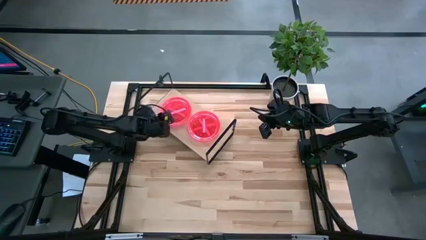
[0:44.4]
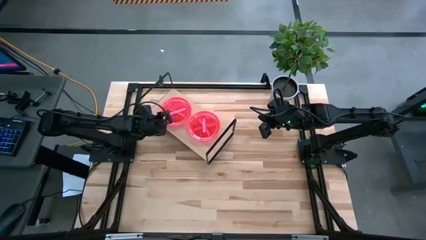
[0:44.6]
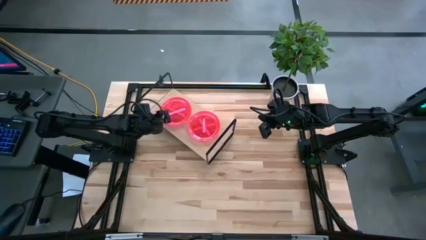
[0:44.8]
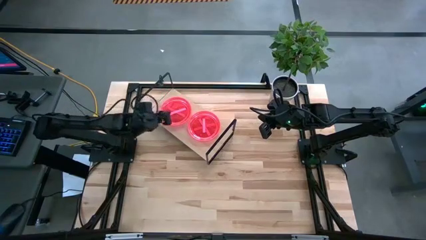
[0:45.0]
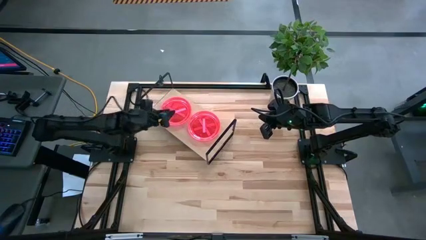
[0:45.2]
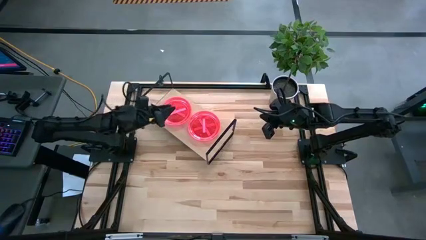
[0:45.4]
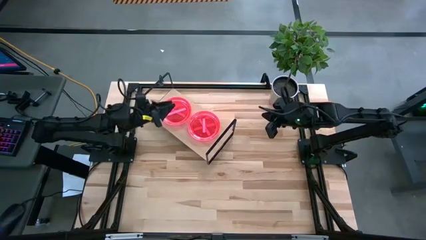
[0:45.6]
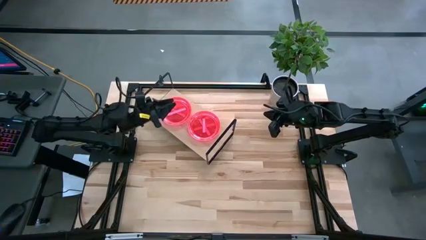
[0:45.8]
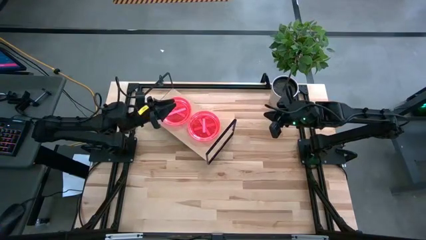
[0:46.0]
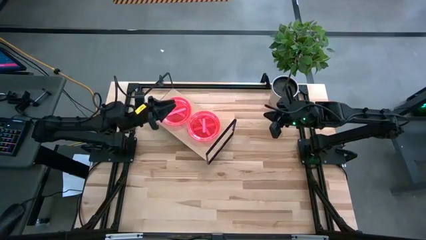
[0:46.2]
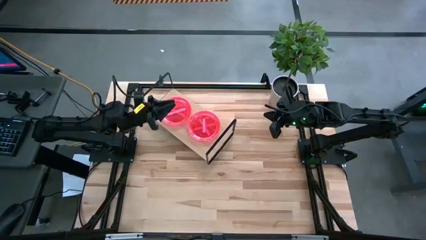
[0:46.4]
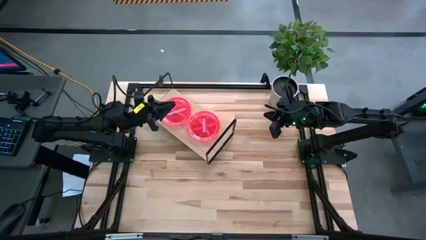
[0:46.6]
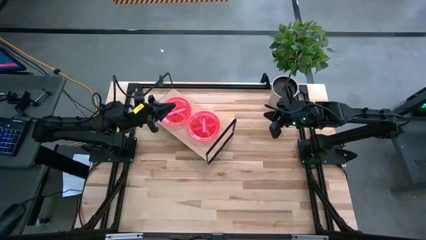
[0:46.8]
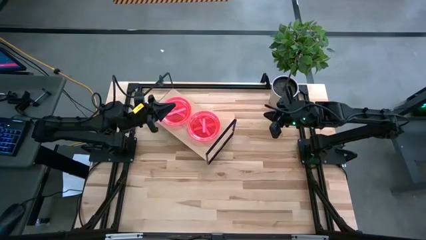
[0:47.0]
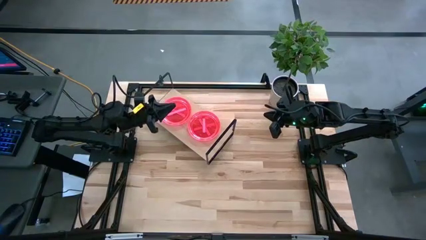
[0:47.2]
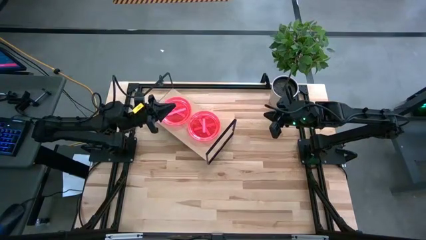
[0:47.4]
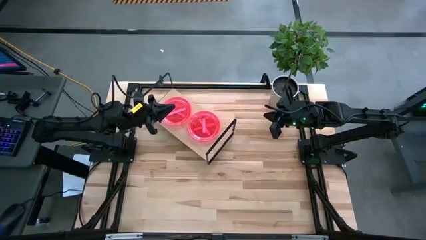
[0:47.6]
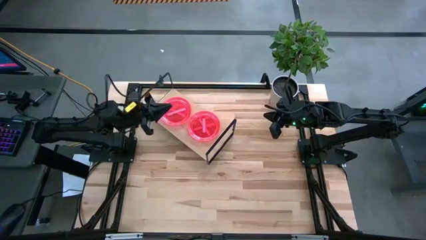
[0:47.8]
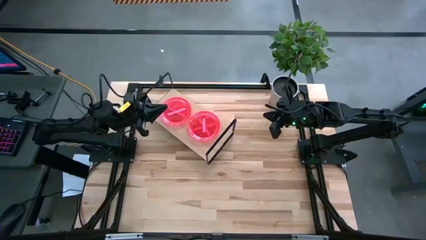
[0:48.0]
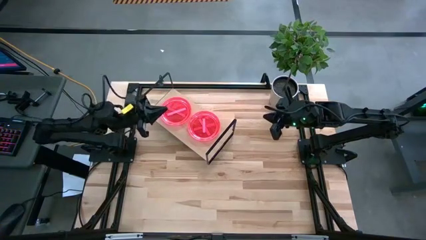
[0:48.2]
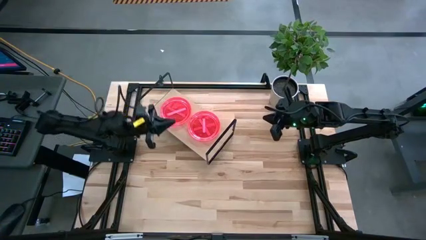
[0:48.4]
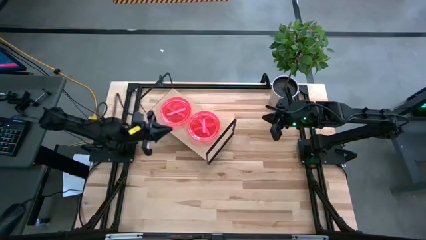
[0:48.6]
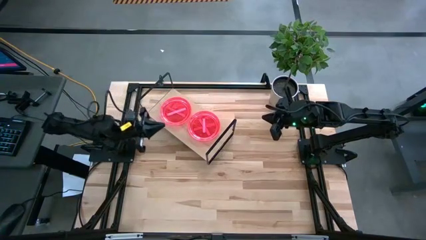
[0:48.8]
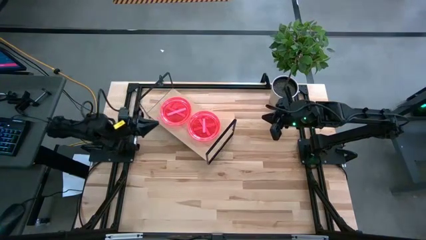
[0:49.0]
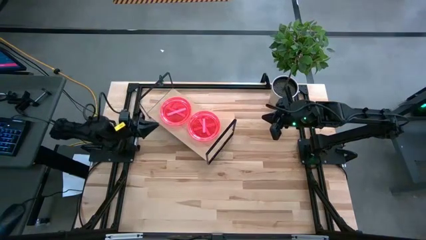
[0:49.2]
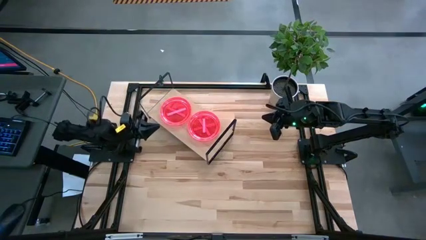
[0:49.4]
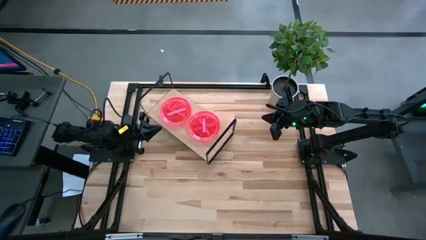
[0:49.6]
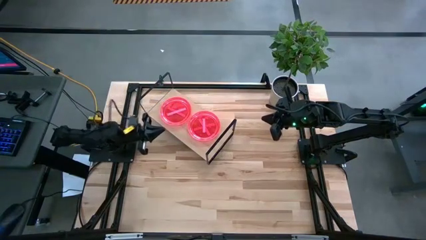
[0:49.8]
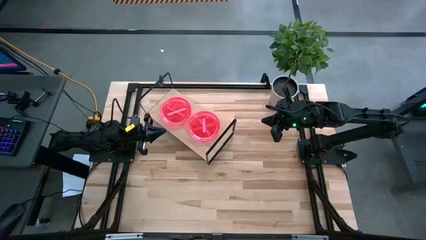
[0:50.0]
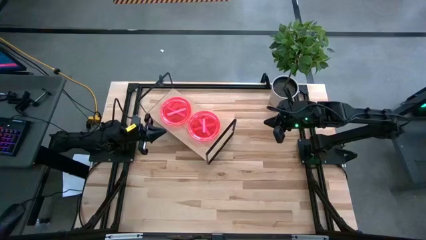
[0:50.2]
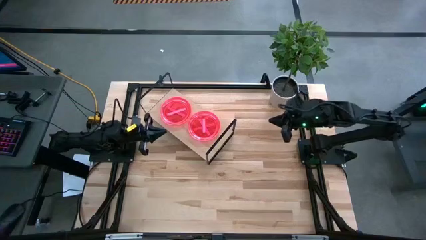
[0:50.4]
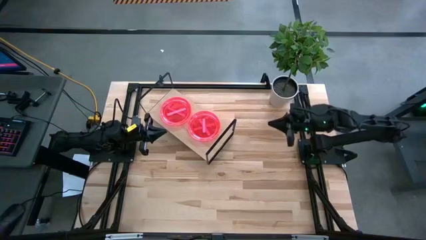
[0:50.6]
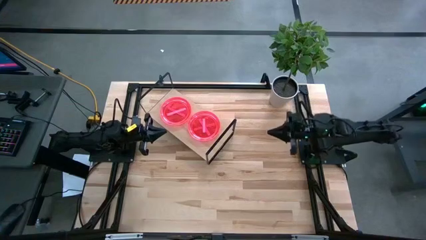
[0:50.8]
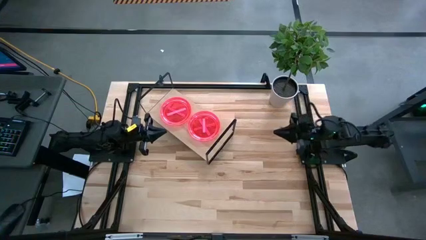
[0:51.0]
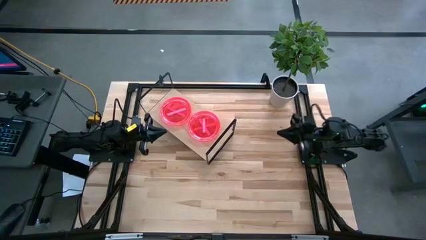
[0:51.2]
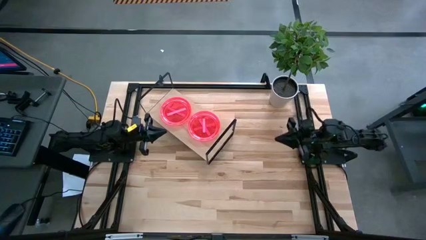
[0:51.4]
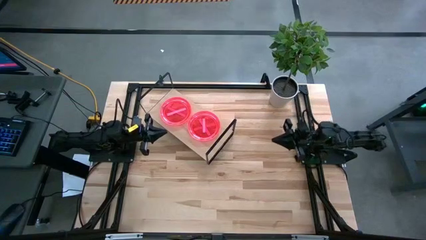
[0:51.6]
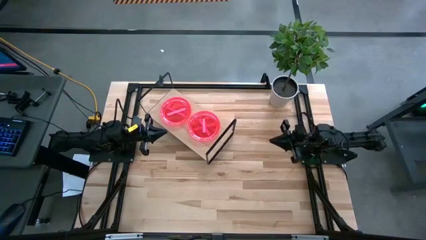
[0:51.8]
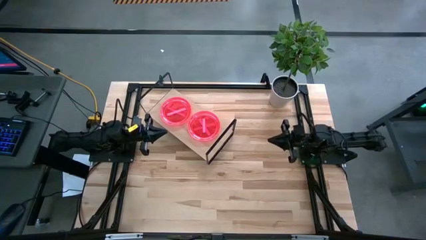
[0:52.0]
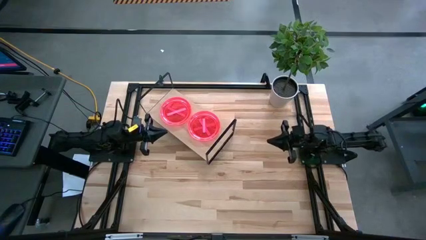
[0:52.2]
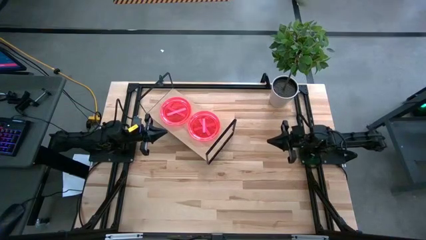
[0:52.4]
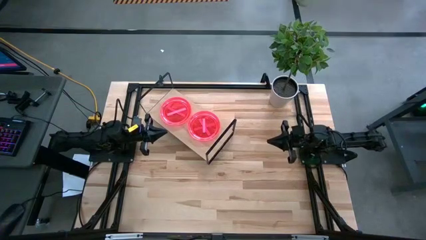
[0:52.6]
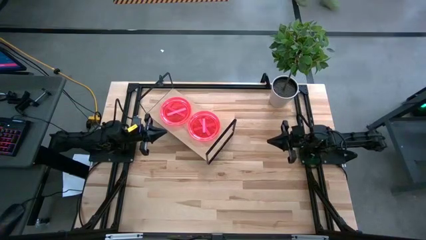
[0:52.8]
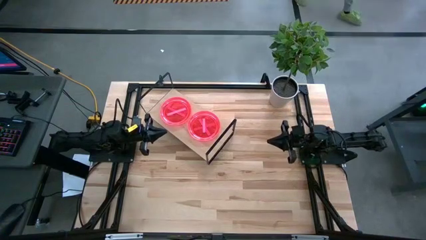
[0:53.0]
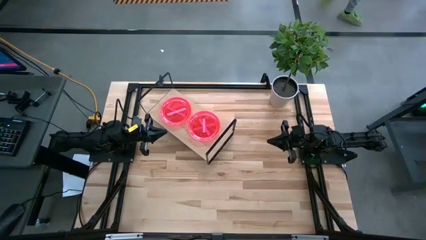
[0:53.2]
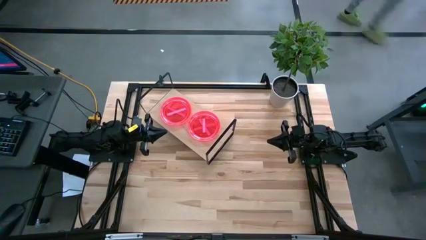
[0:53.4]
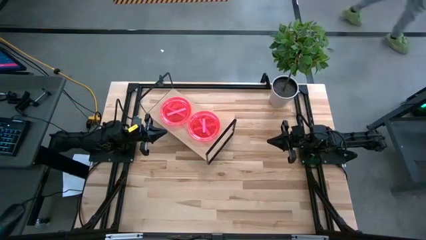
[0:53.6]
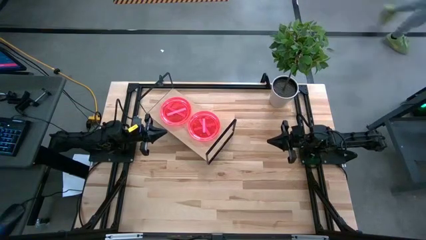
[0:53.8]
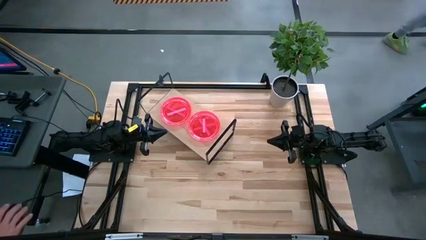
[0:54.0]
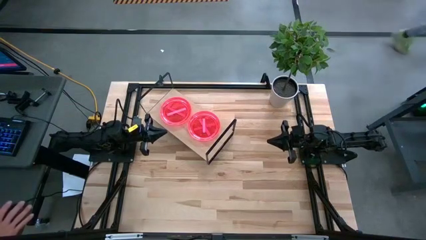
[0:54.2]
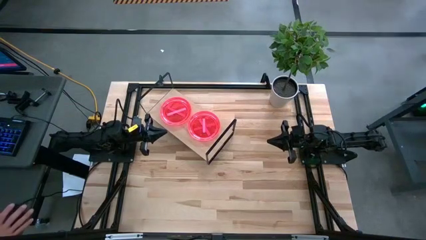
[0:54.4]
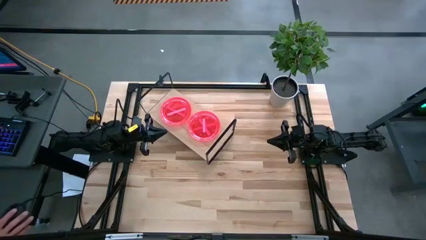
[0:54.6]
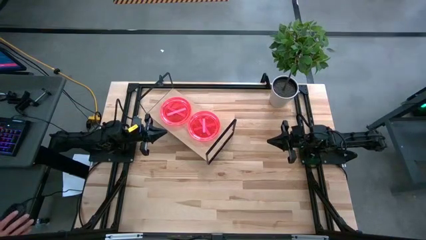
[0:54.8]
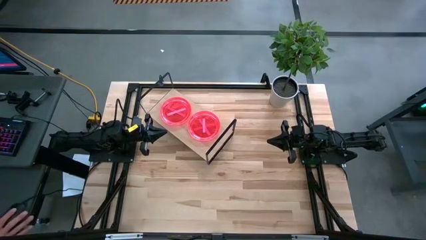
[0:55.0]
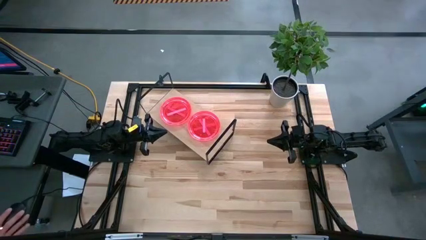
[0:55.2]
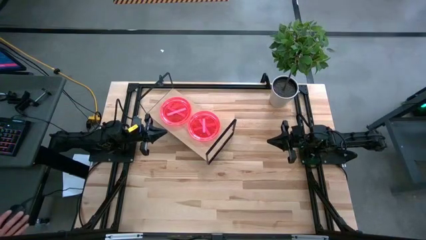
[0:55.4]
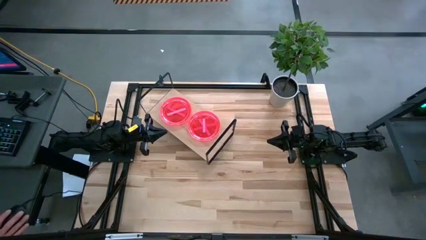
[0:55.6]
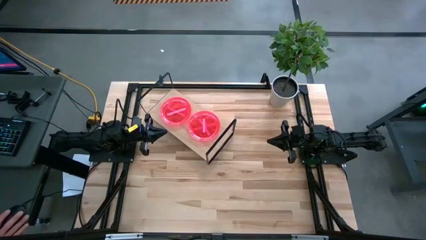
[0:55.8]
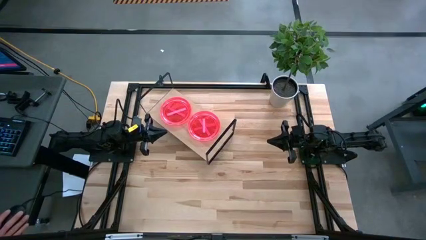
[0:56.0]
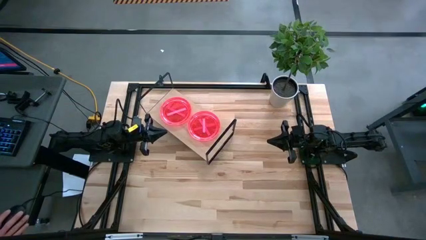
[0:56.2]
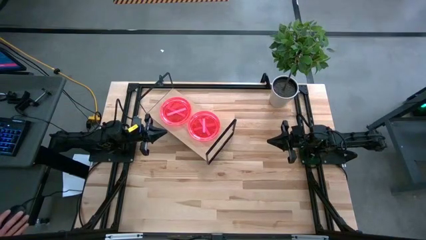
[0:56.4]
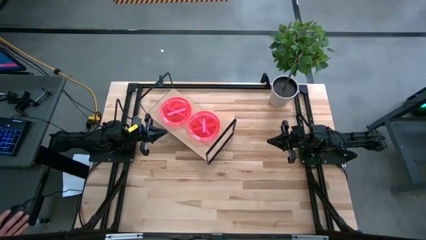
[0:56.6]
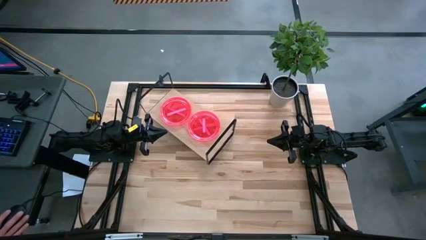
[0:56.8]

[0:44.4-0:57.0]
Task: Place and stack plates onto a shelf
Return to Home Position
